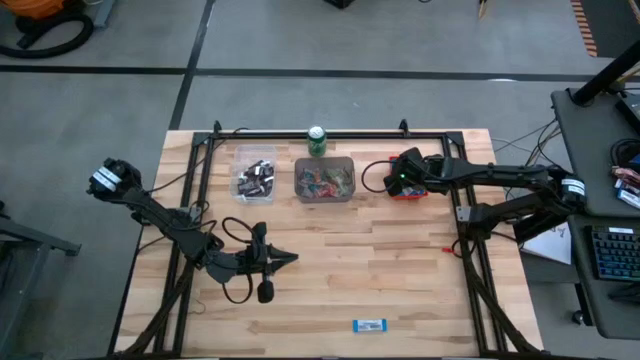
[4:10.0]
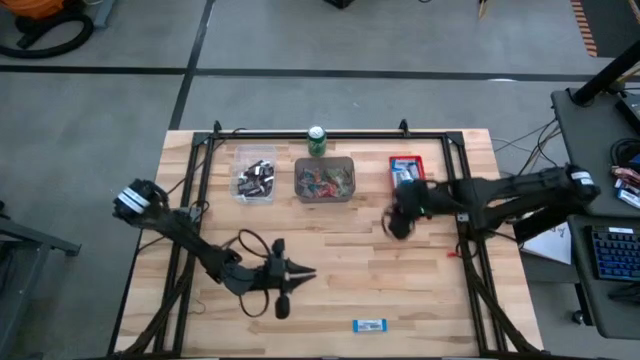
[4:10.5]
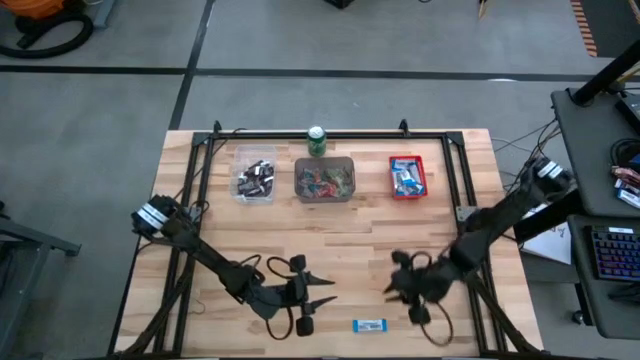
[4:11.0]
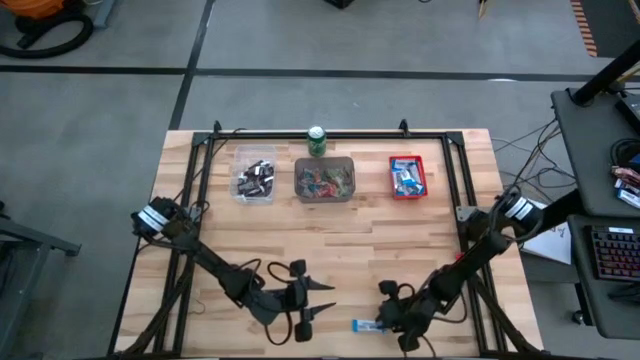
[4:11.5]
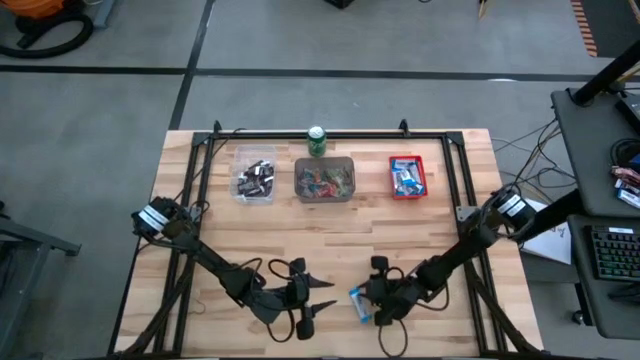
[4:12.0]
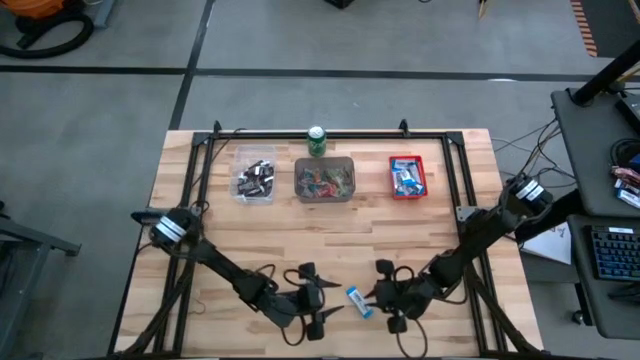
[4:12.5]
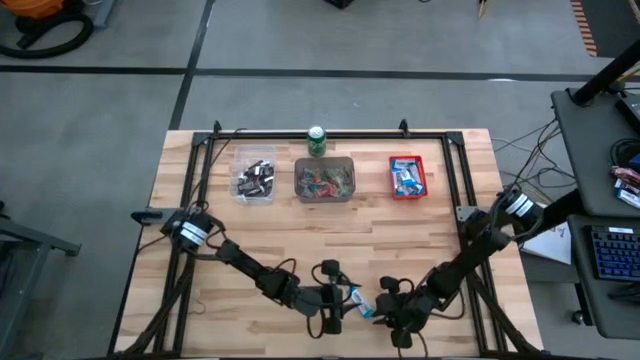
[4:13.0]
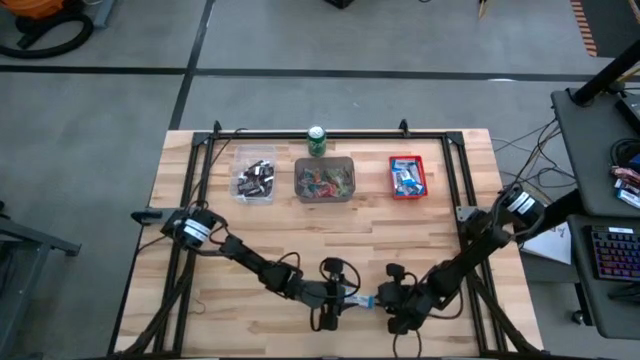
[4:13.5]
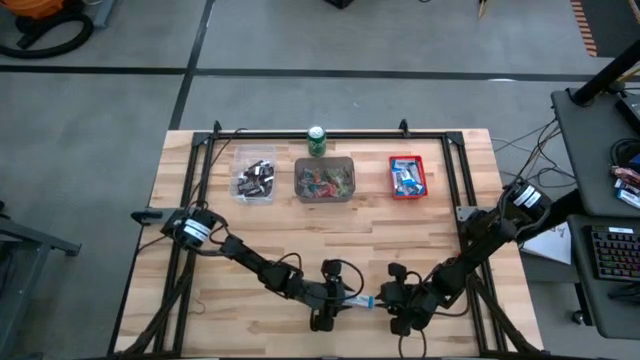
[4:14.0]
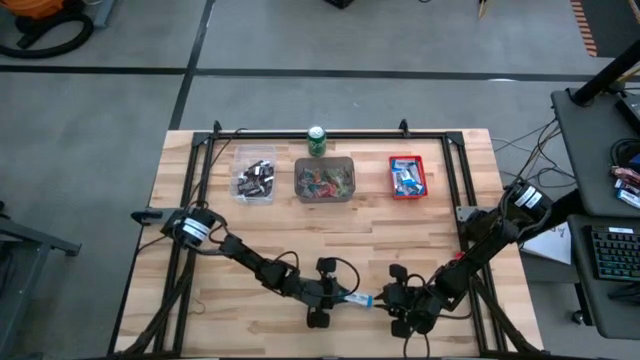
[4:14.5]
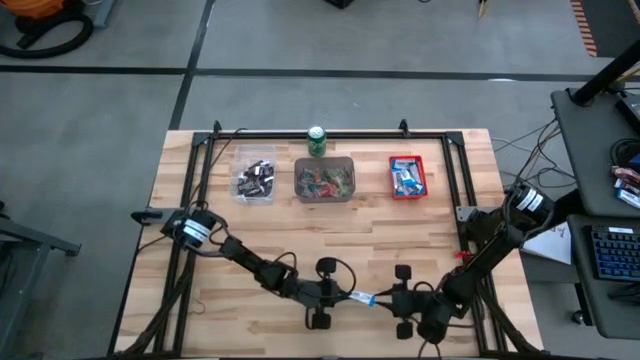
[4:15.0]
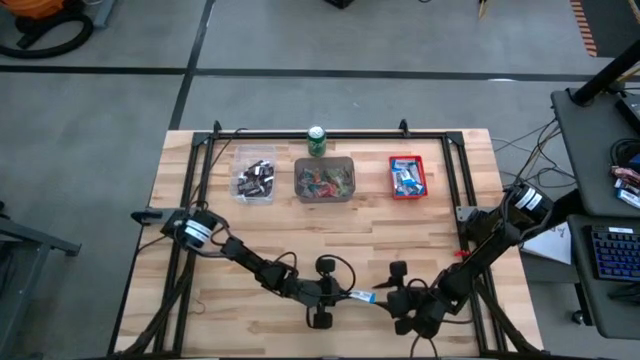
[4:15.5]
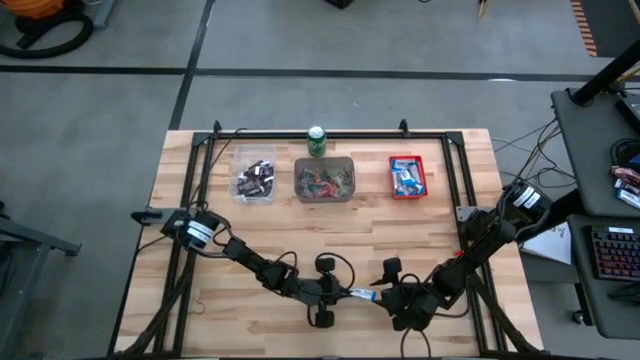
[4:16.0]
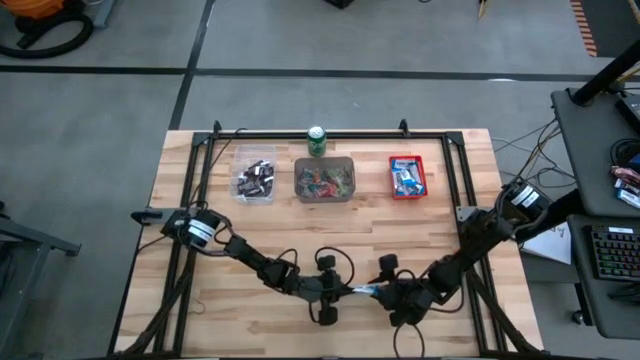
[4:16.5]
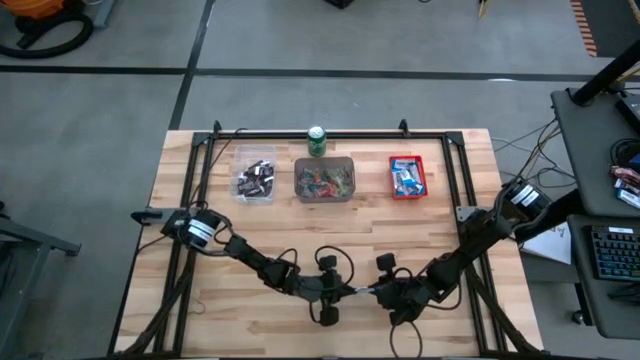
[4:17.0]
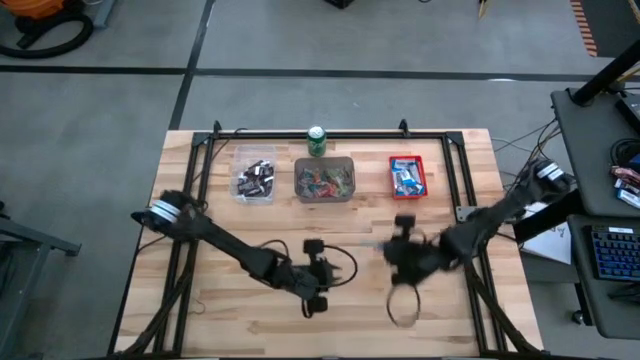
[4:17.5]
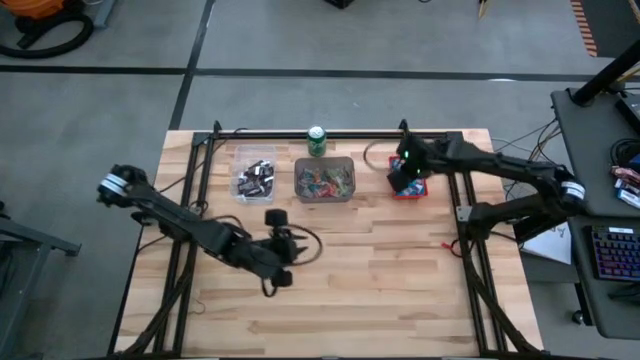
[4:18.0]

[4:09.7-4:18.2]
Task: Organize candy in baskets
Put the white chocolate bar into the red bin

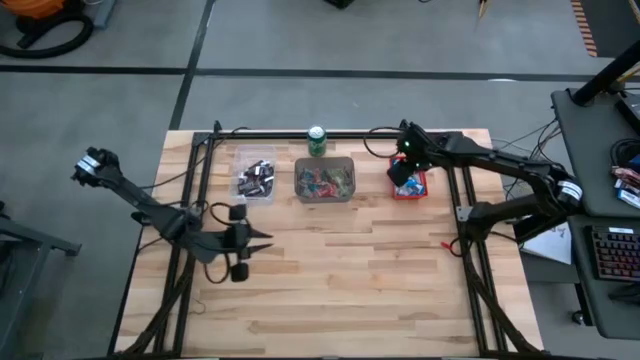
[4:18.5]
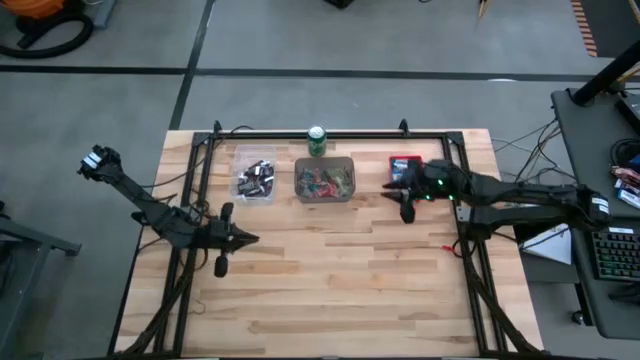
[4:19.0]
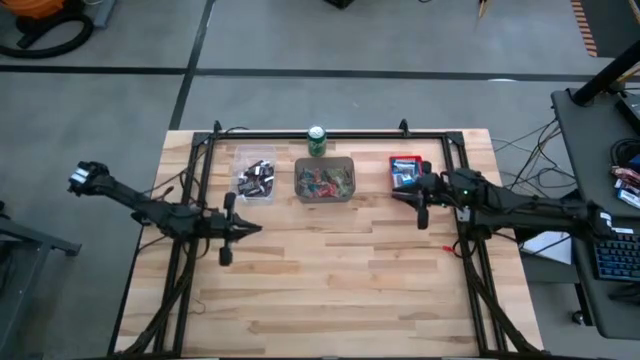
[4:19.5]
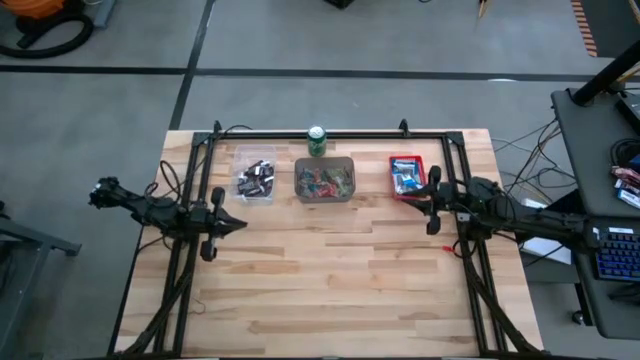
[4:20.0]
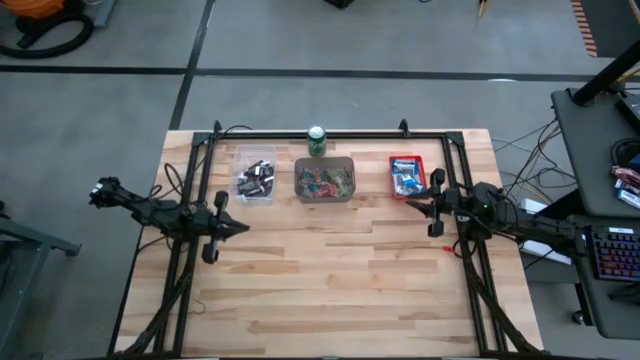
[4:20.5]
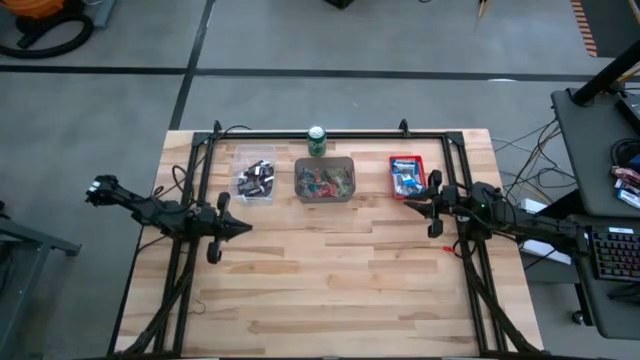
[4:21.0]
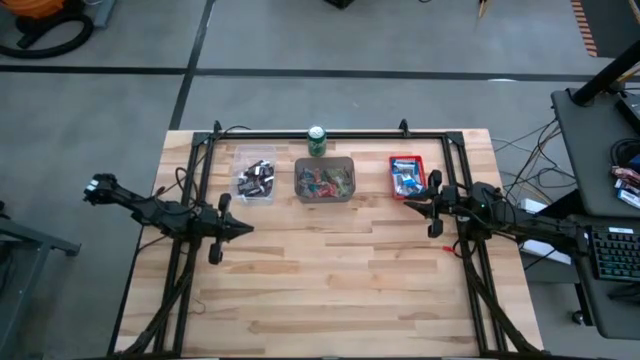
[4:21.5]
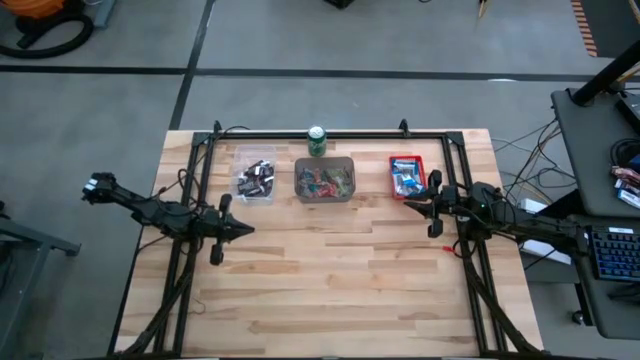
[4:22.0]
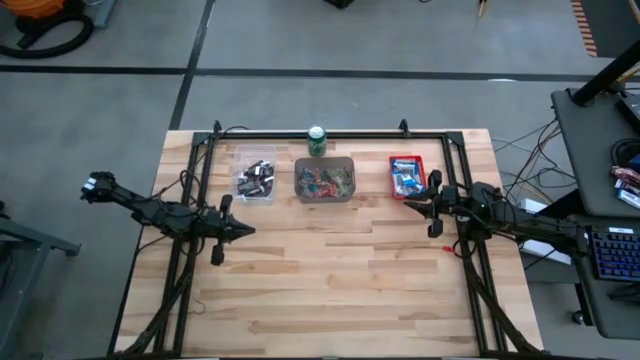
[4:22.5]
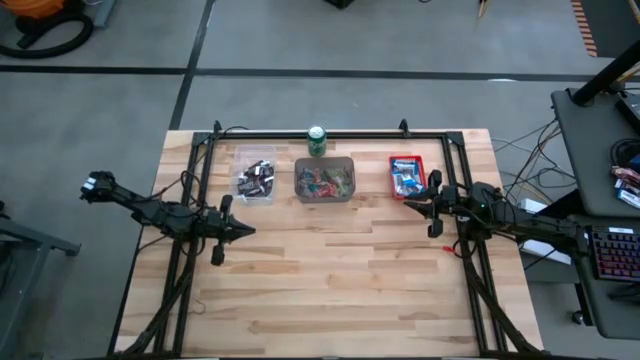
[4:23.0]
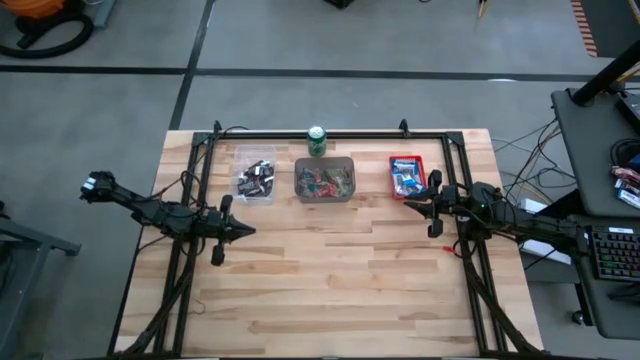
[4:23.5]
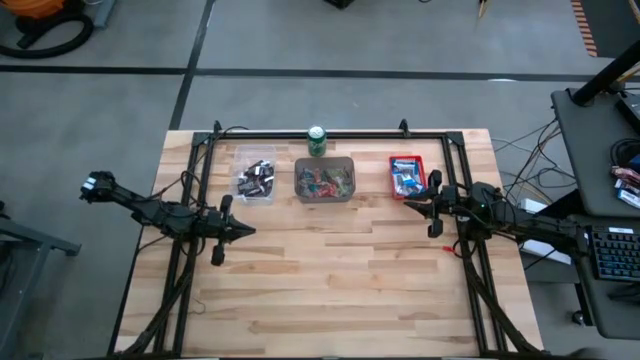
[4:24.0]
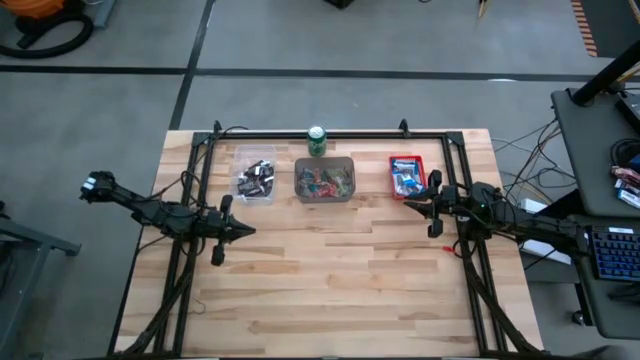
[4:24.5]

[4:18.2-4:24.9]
Return to Home Position

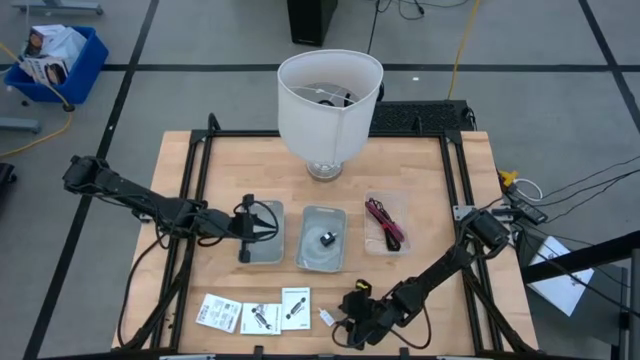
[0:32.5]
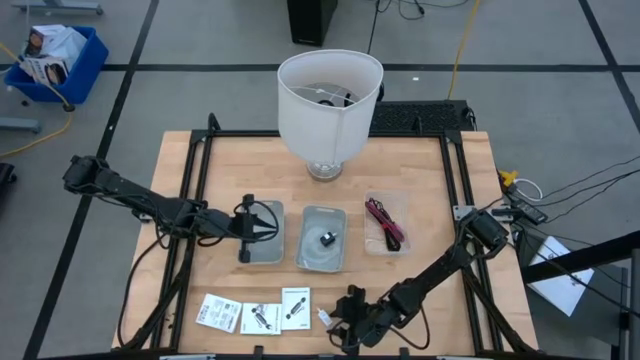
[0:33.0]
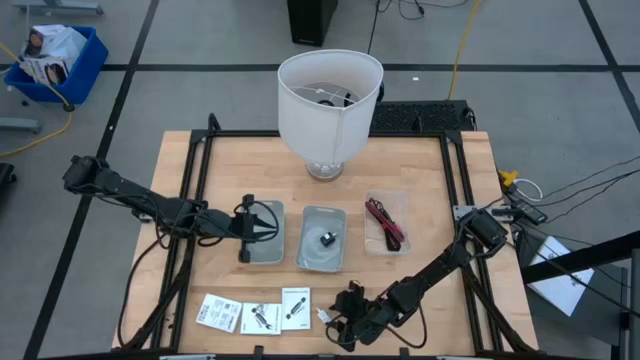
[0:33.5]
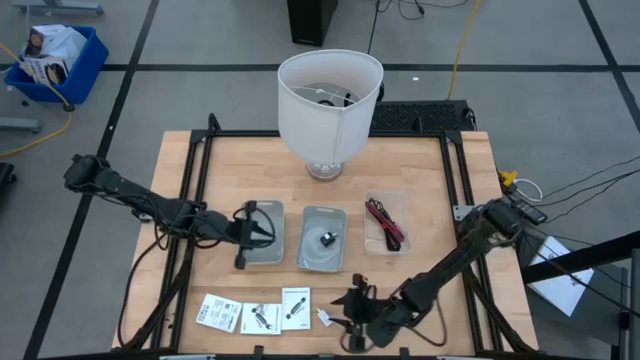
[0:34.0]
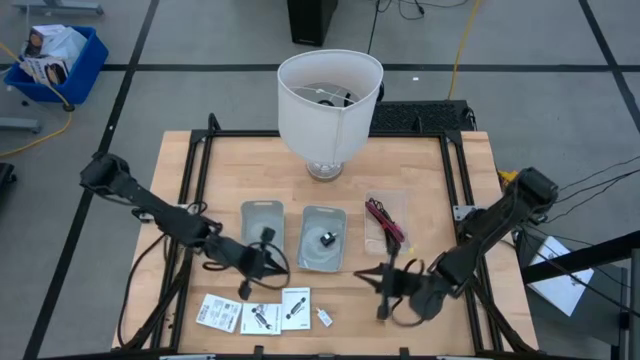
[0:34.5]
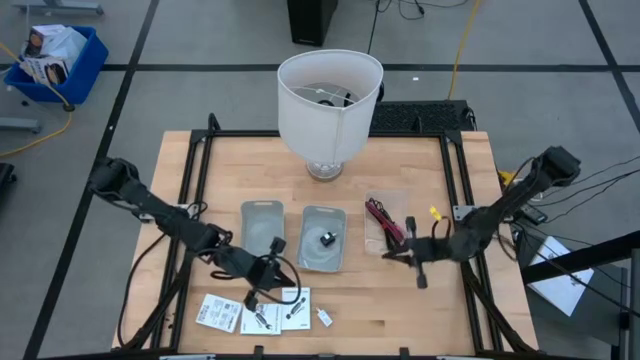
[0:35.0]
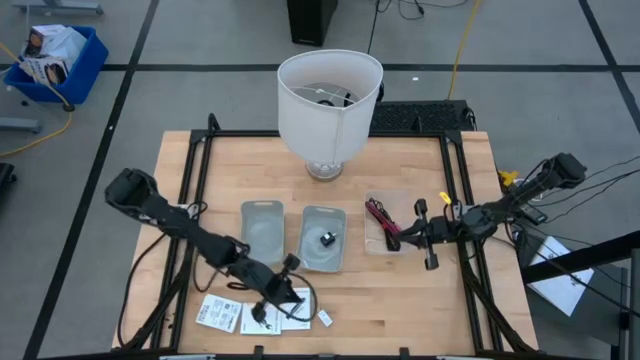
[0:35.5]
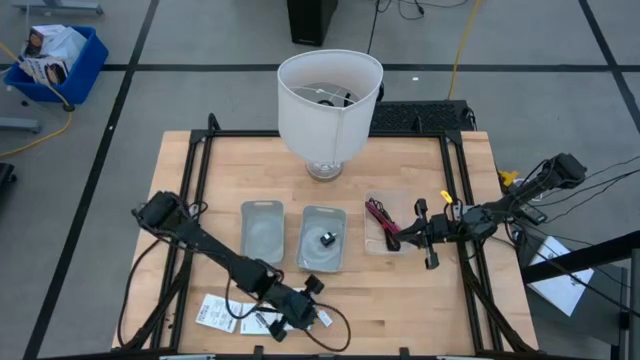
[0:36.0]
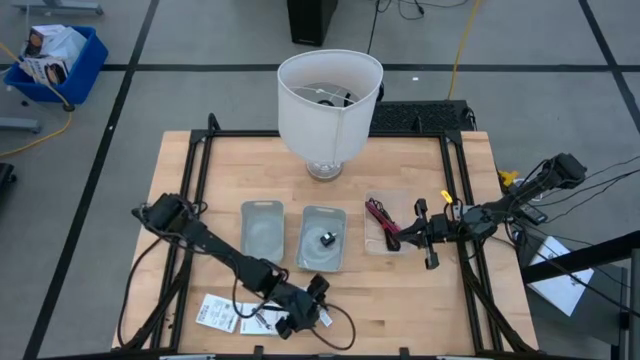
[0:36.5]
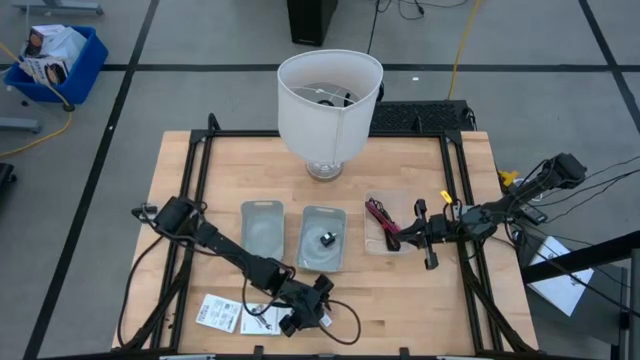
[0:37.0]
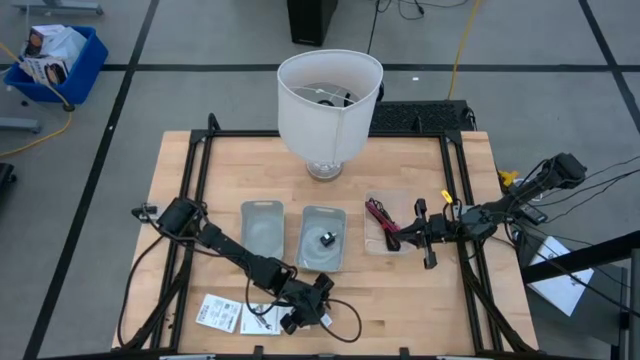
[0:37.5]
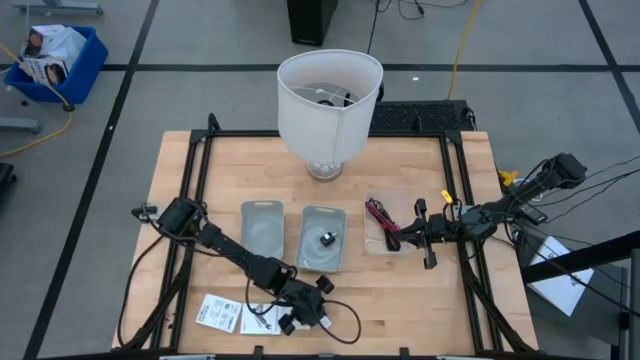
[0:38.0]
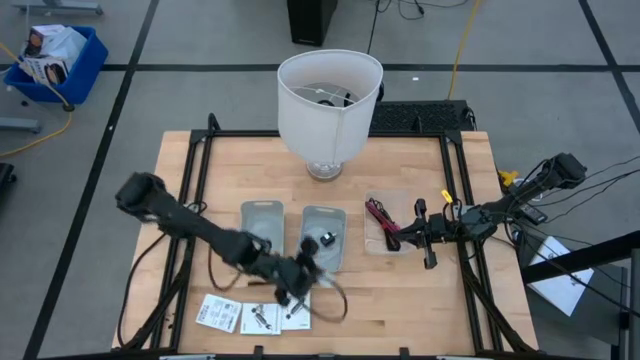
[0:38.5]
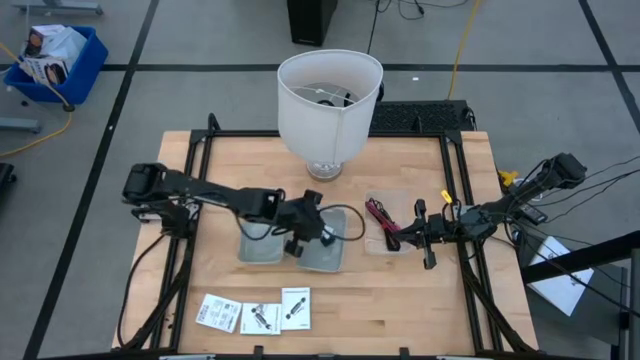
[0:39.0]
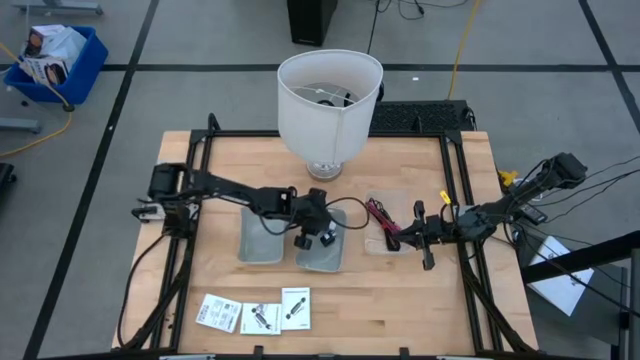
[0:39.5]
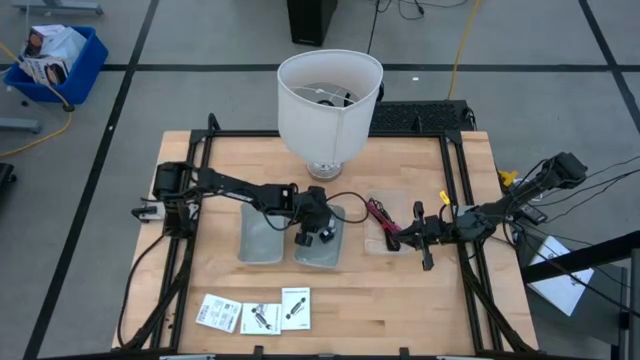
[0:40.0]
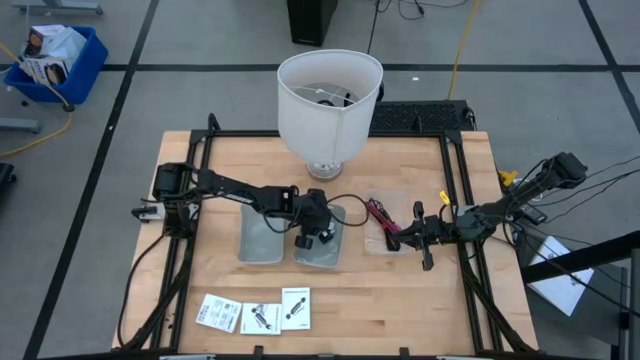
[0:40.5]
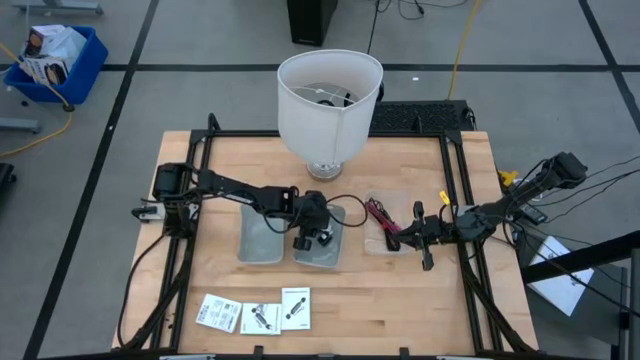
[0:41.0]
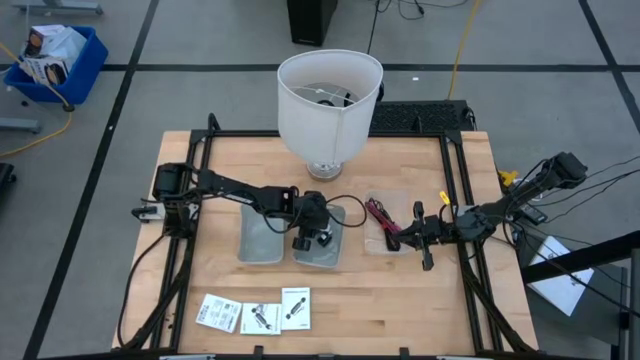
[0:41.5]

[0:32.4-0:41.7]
Task: Pick and place items into bin
Put the white charger adapter into the right gray bin
